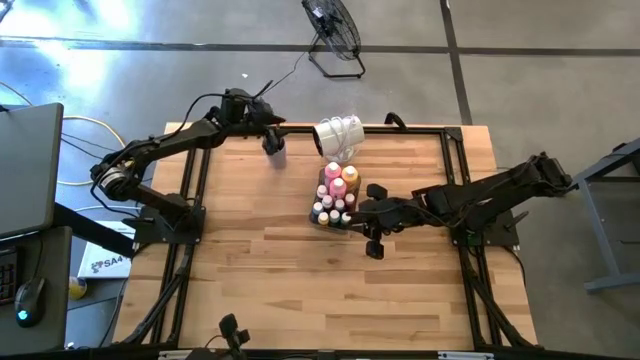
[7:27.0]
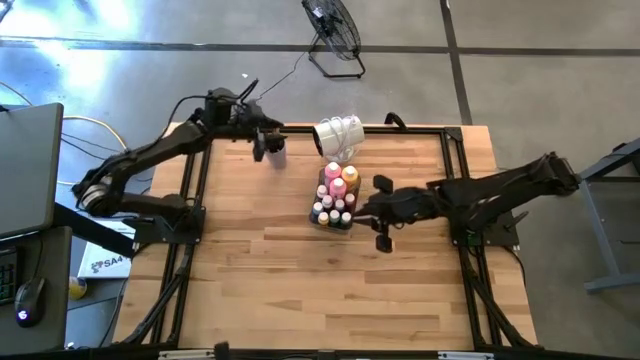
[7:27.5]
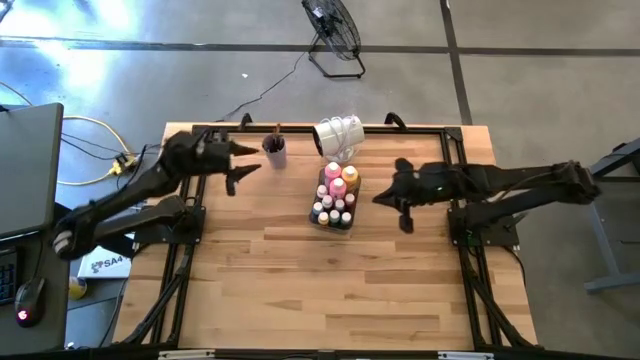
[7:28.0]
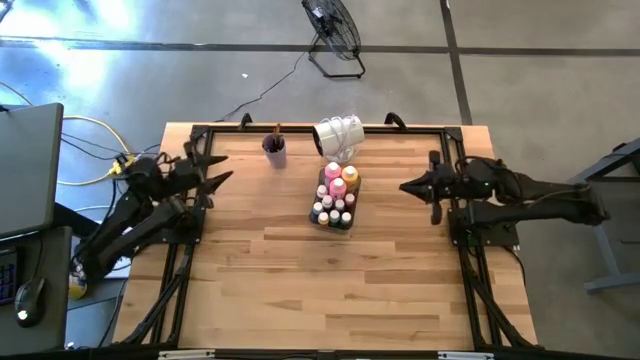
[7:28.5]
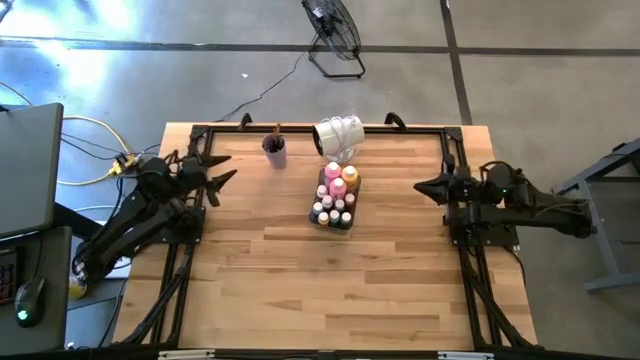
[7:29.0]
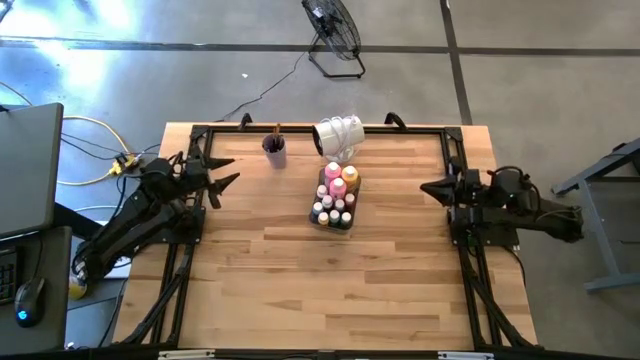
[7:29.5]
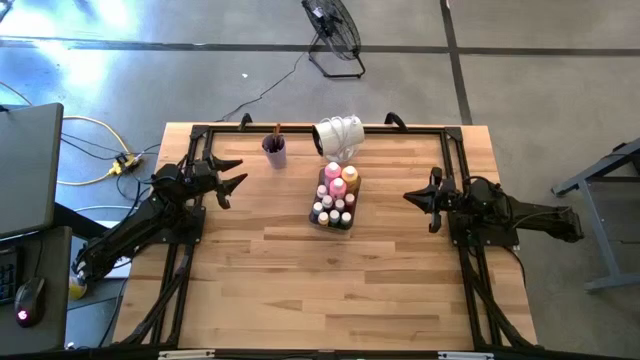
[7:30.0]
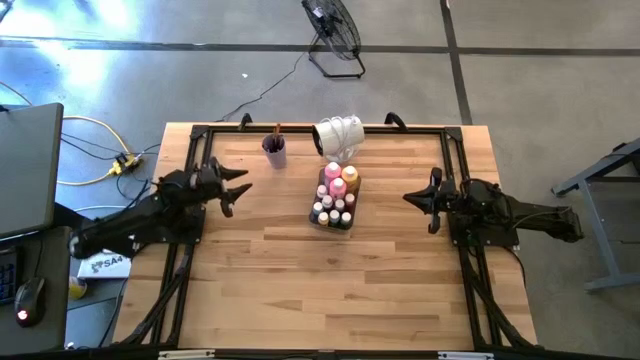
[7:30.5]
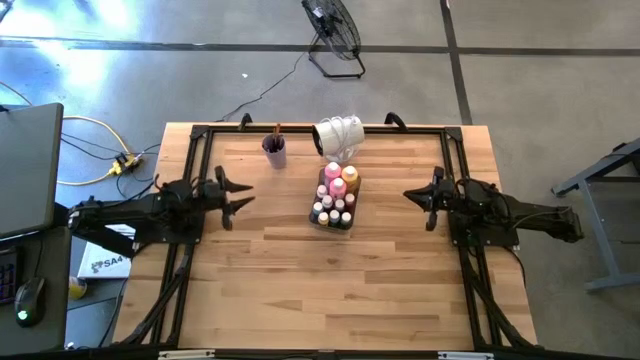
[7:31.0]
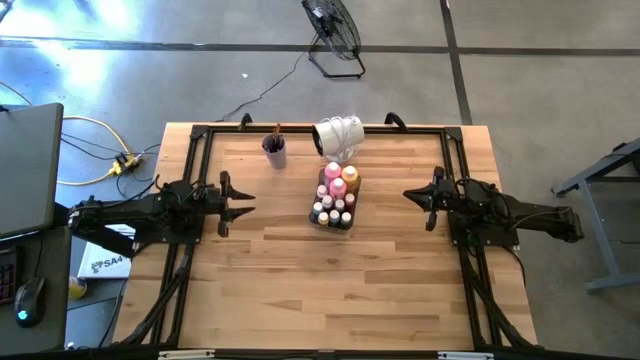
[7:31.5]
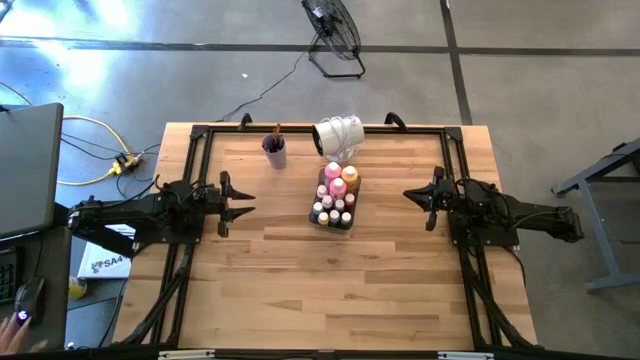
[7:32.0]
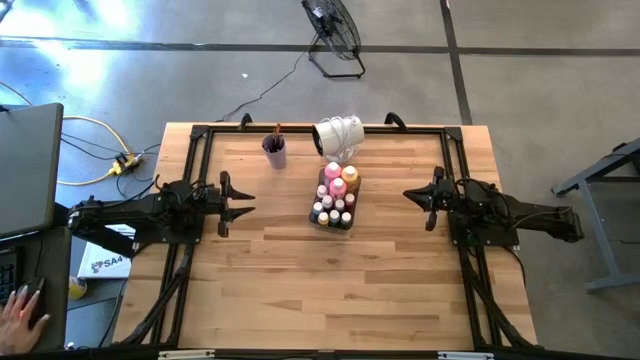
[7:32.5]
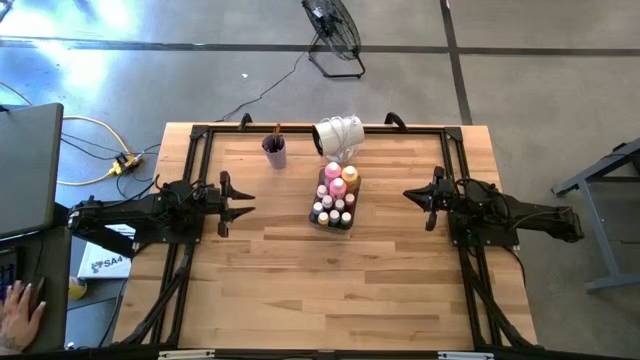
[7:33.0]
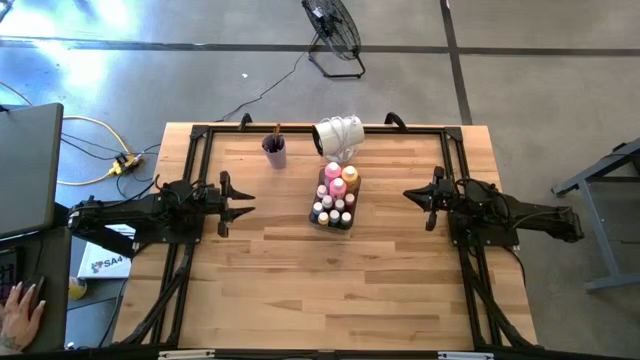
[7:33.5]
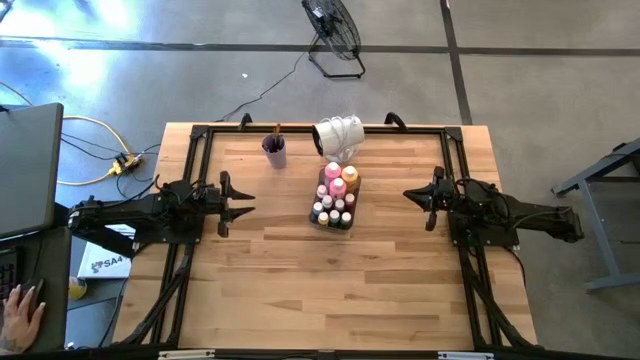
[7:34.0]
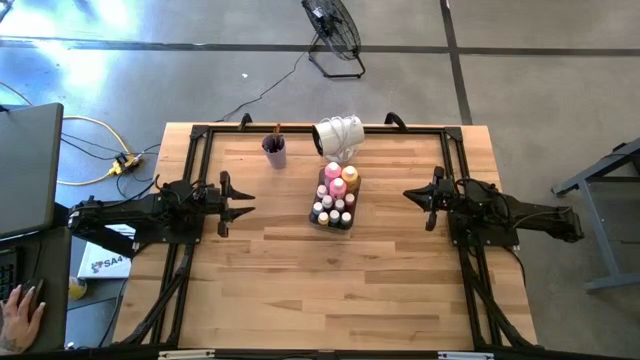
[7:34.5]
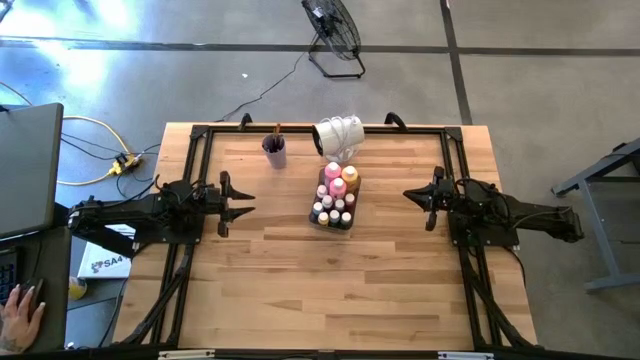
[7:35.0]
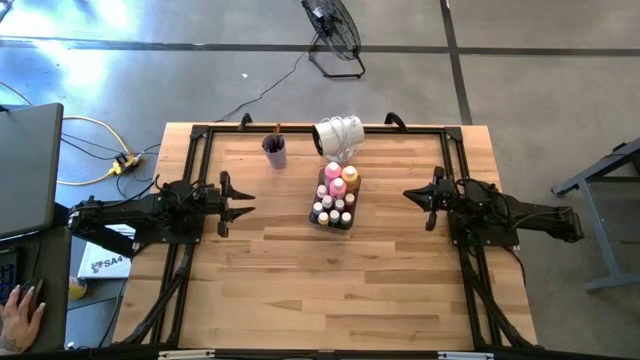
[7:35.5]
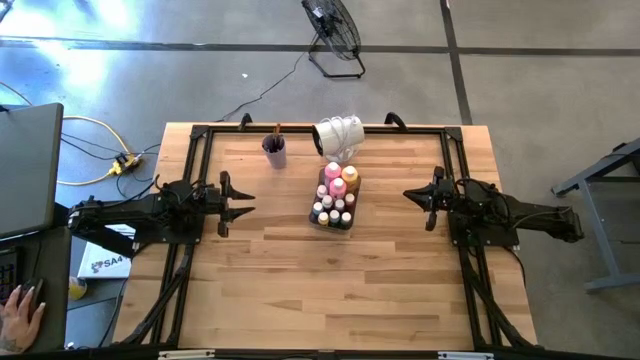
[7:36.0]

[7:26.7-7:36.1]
Task: Pick & Place Paint Supplies
Return to Home Position

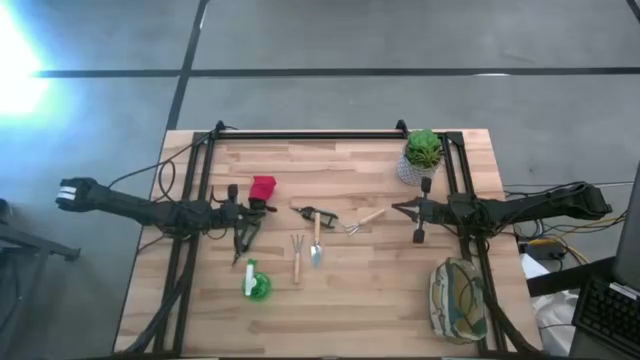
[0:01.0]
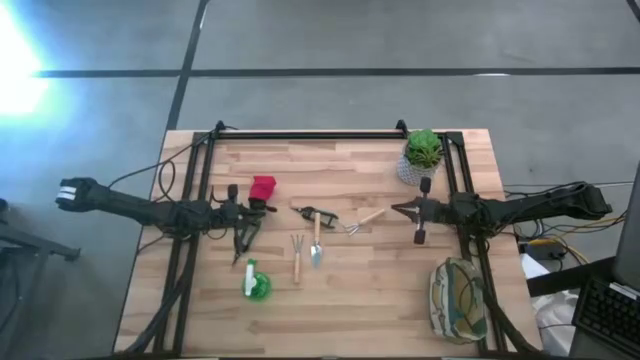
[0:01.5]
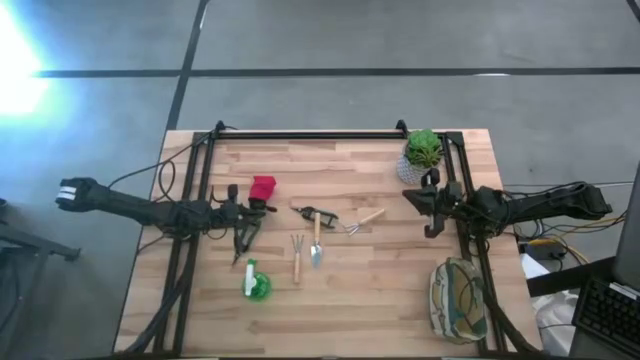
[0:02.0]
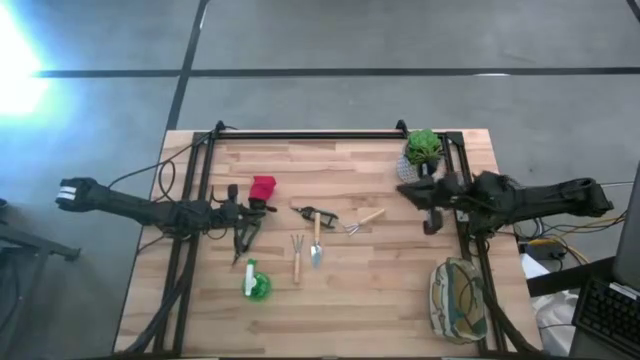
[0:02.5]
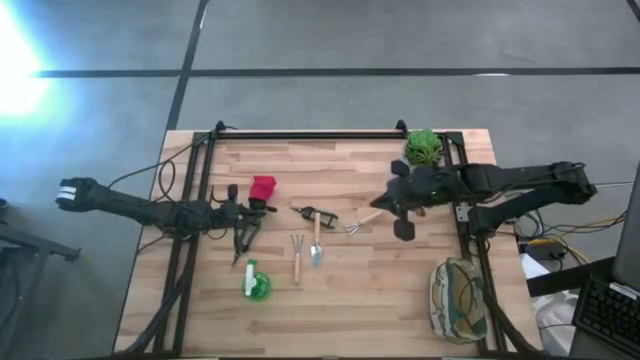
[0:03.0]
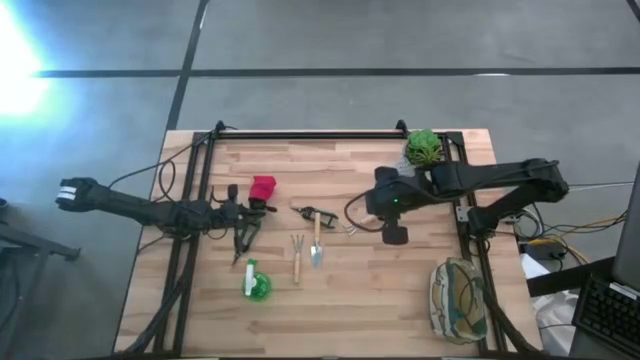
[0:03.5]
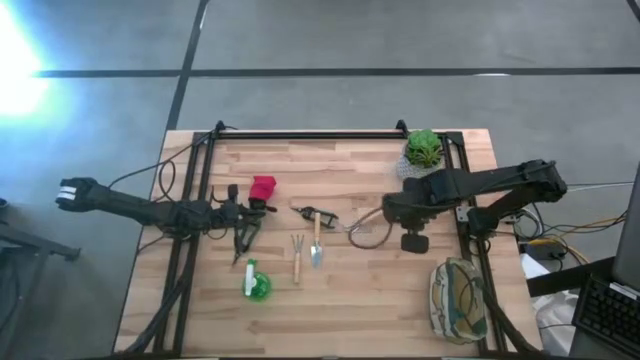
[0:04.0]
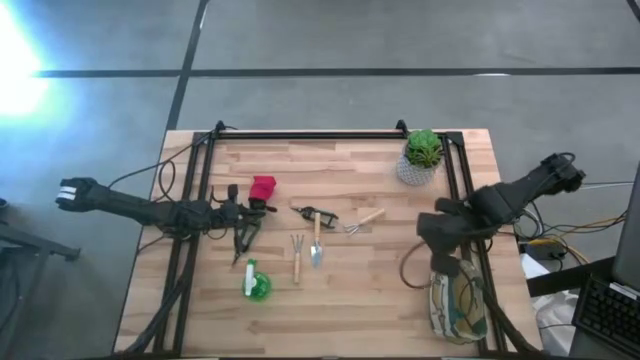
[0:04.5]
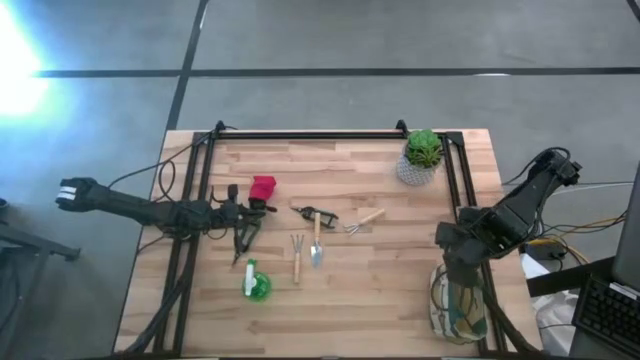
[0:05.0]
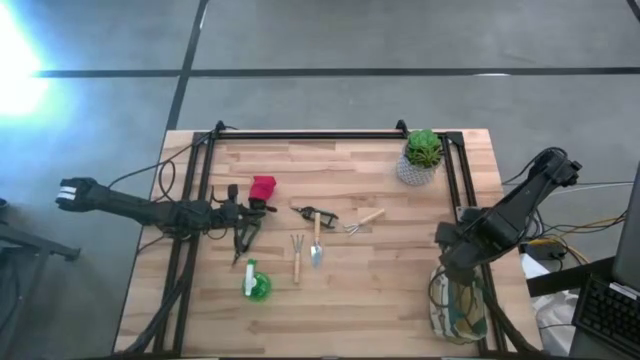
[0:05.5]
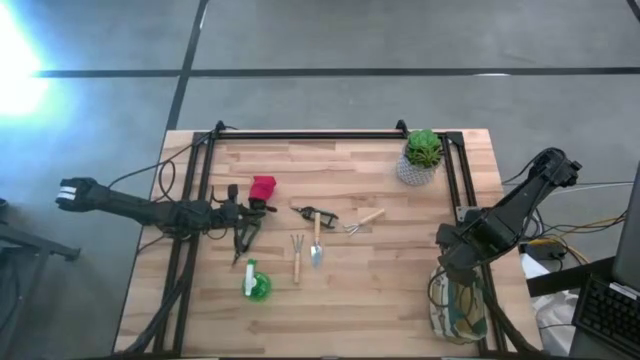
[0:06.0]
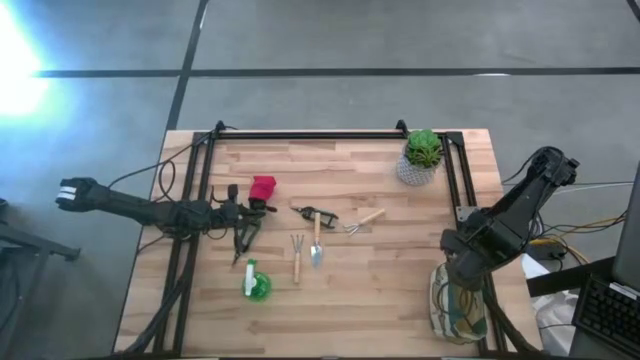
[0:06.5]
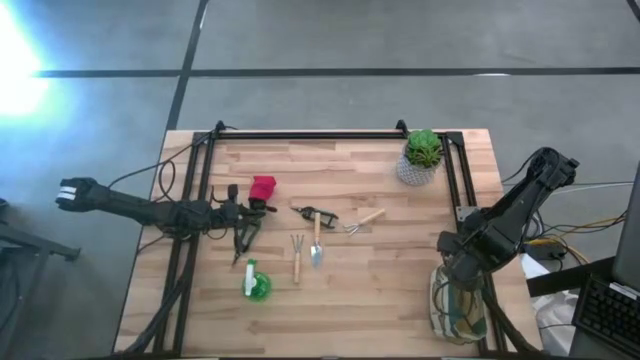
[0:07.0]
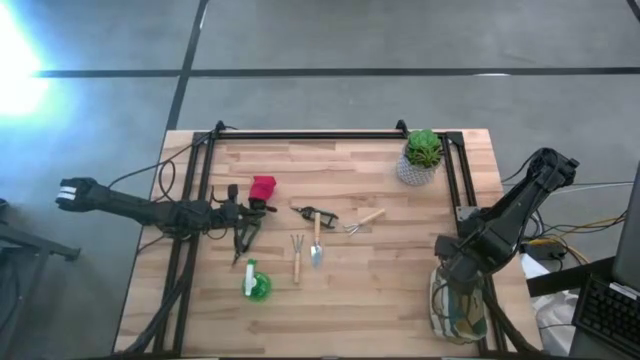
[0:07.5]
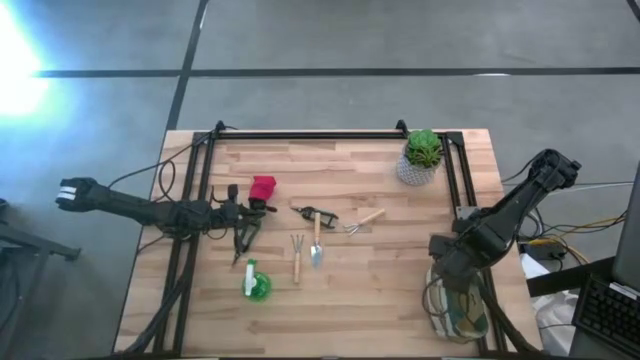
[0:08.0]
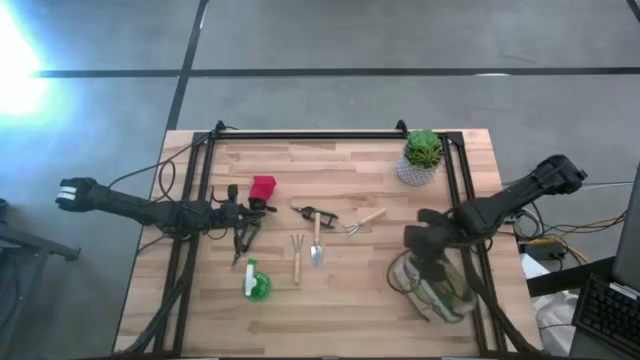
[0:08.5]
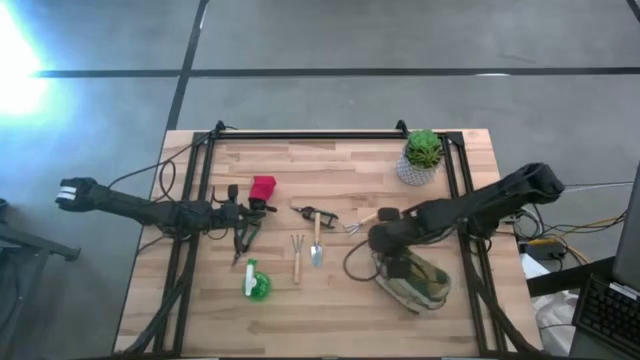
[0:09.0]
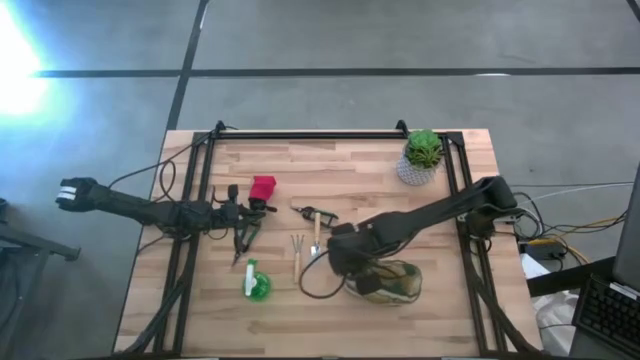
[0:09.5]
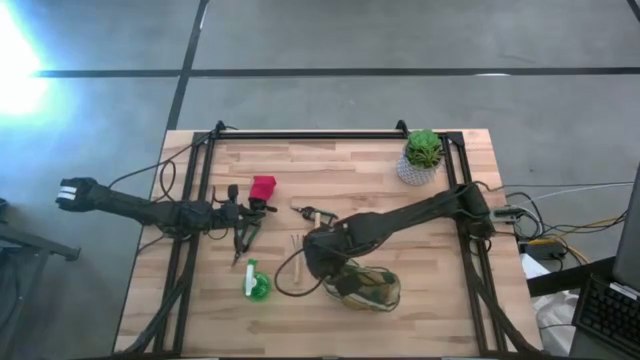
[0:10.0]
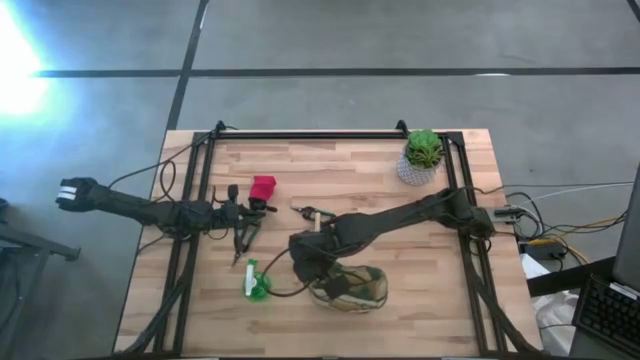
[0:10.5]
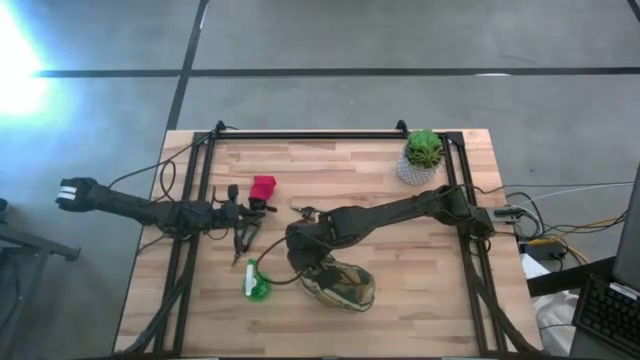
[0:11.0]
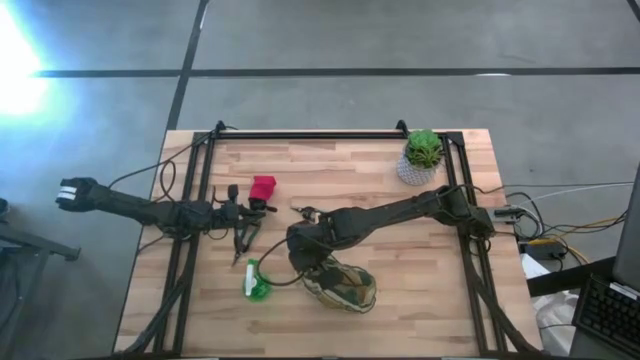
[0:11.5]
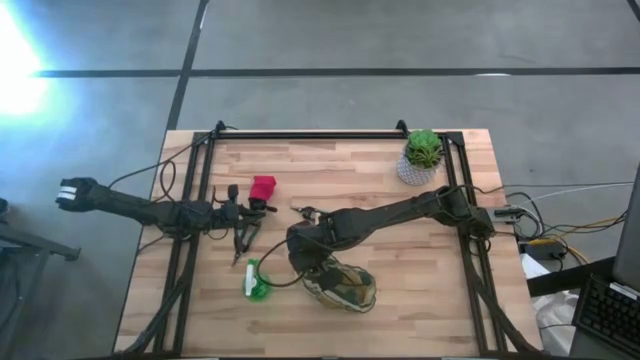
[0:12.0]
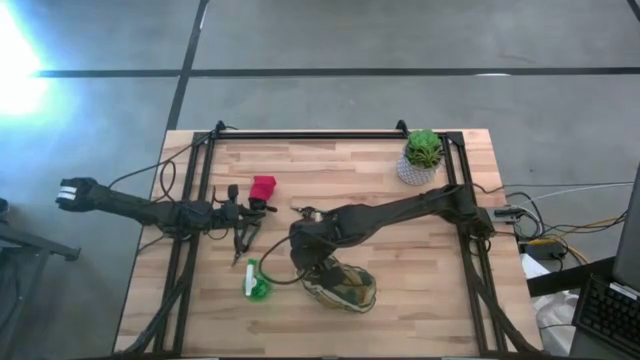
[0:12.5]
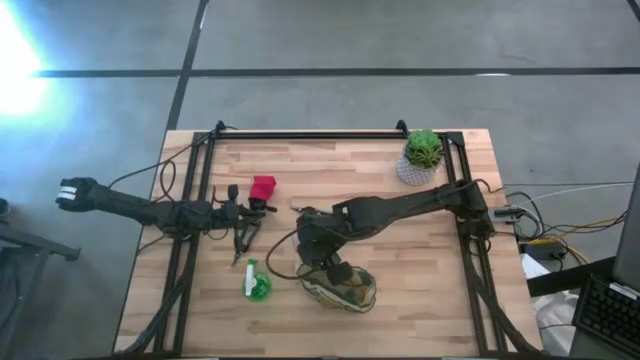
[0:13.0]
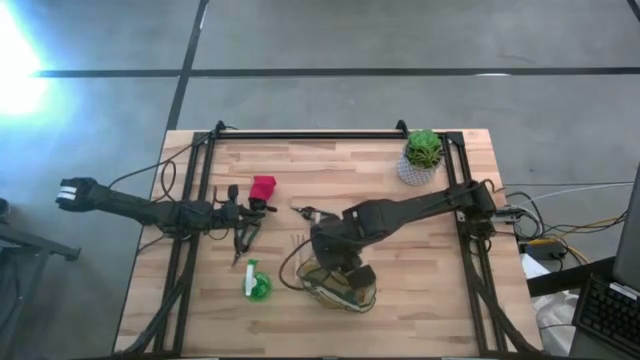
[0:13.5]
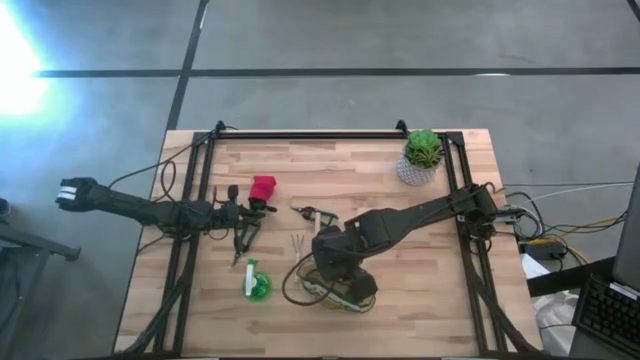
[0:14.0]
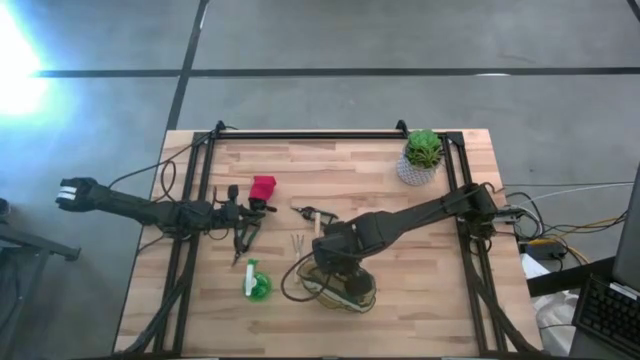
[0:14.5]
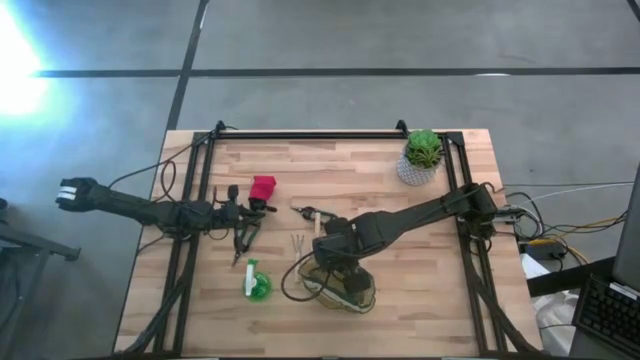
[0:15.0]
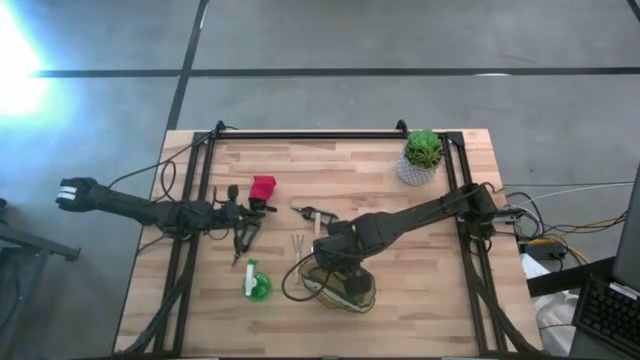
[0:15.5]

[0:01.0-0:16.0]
Task: Pick & Place Garden tools in Gardening bag
Prepare the white gardening bag
